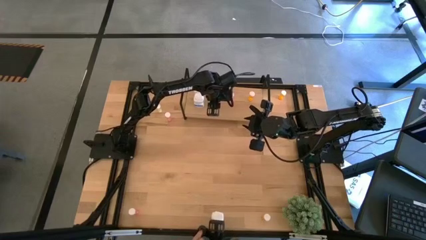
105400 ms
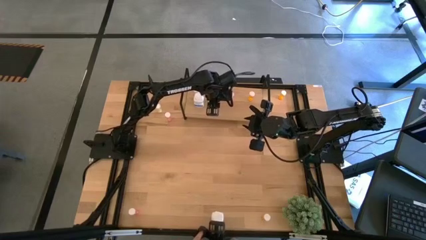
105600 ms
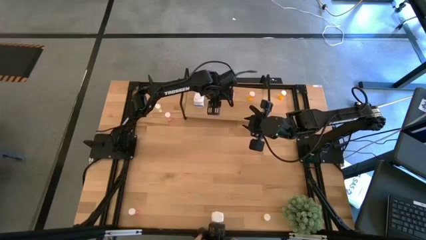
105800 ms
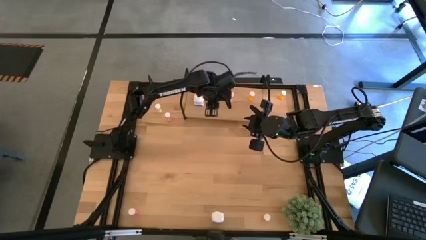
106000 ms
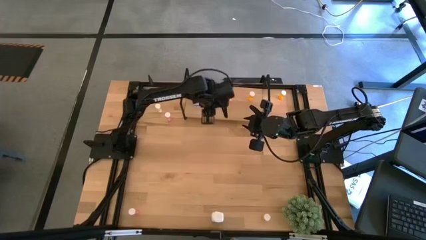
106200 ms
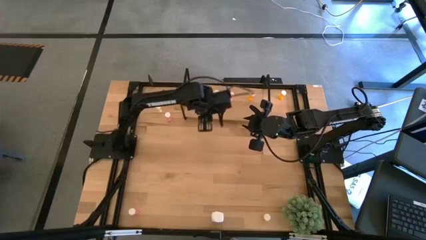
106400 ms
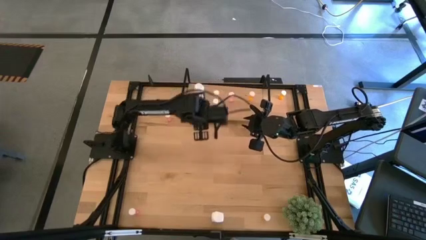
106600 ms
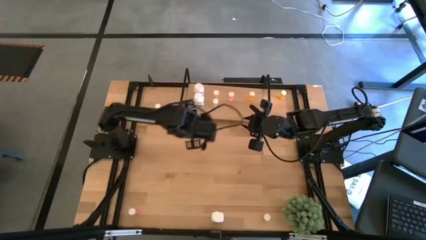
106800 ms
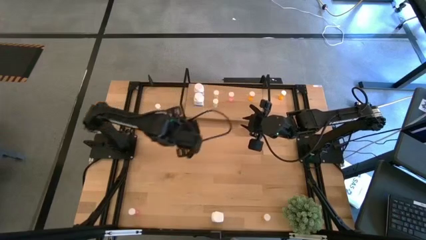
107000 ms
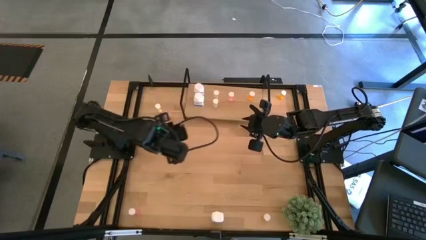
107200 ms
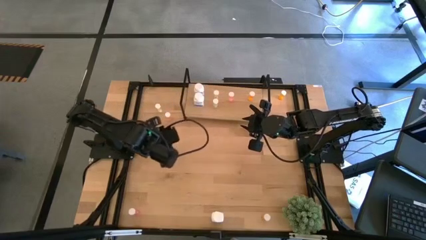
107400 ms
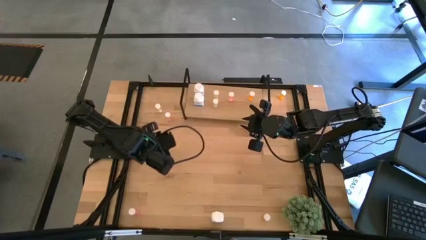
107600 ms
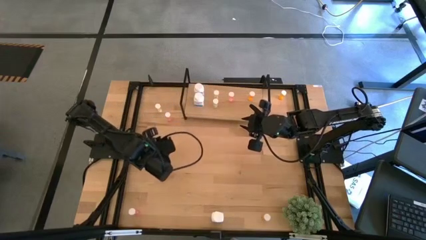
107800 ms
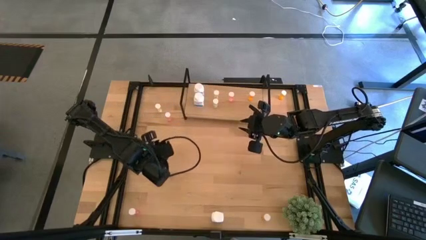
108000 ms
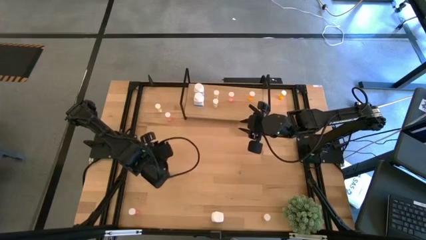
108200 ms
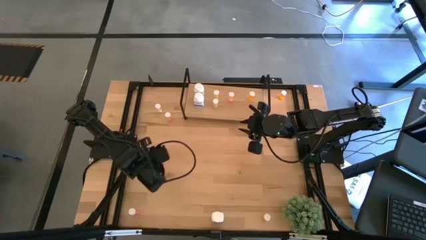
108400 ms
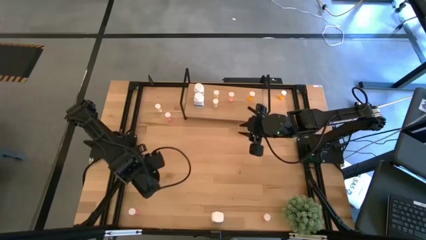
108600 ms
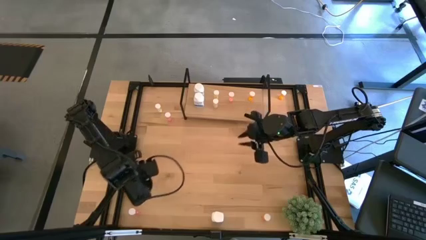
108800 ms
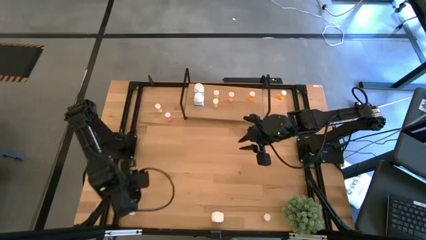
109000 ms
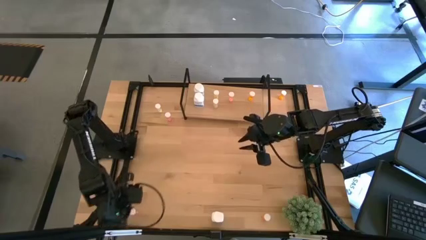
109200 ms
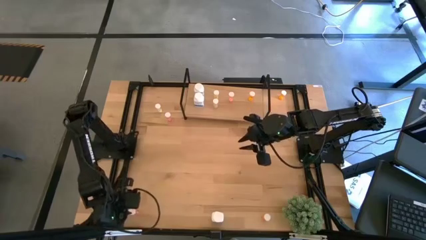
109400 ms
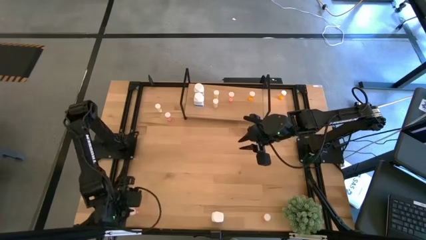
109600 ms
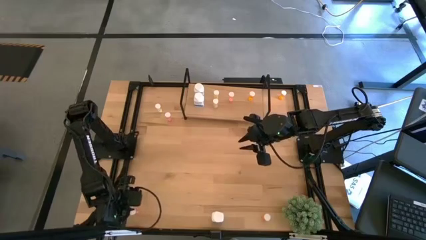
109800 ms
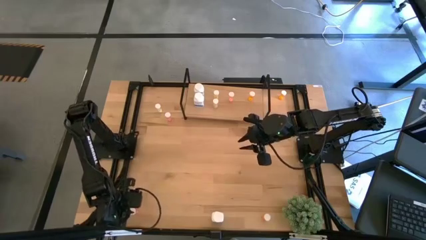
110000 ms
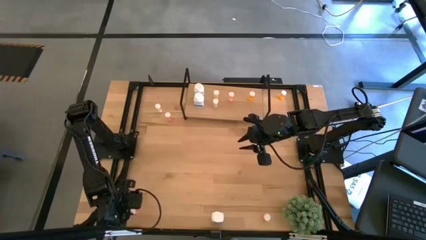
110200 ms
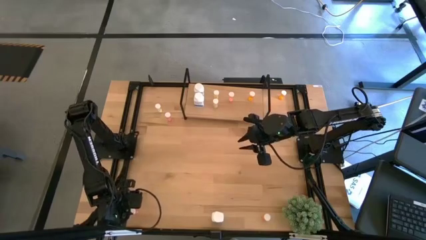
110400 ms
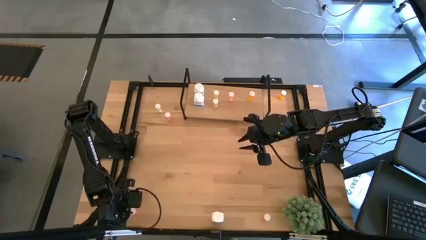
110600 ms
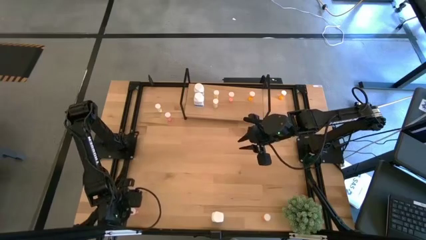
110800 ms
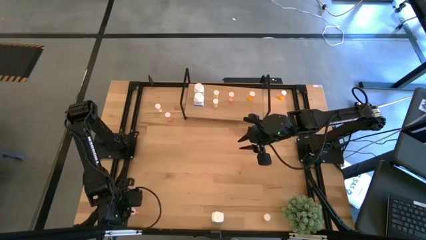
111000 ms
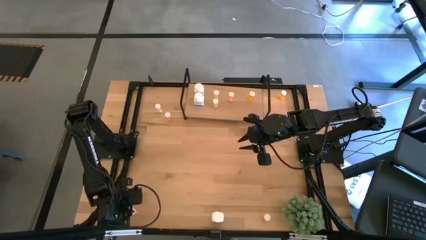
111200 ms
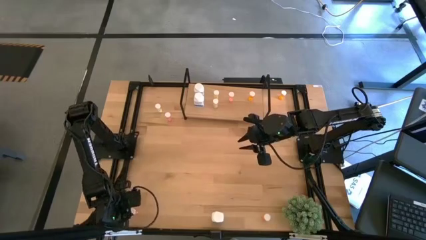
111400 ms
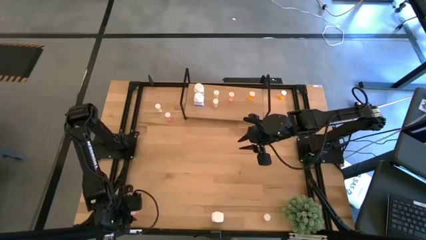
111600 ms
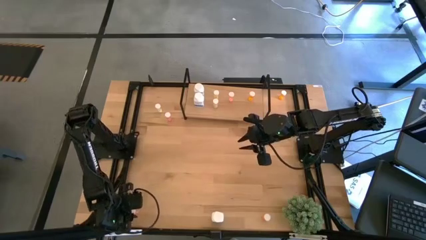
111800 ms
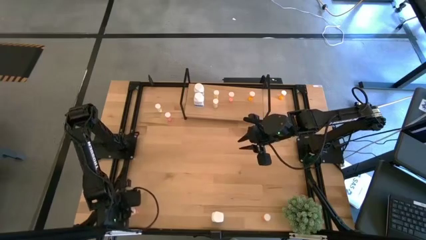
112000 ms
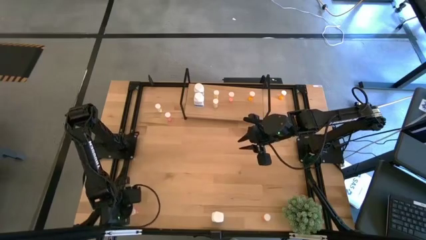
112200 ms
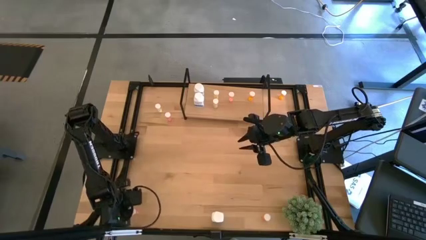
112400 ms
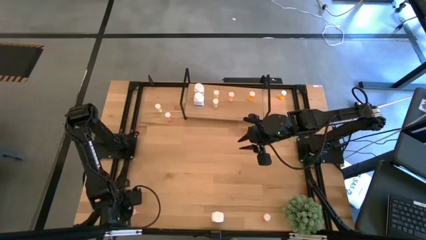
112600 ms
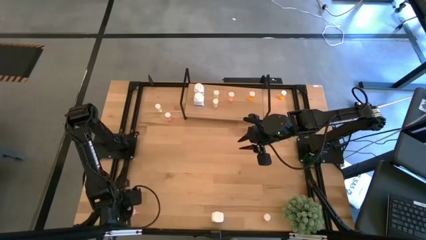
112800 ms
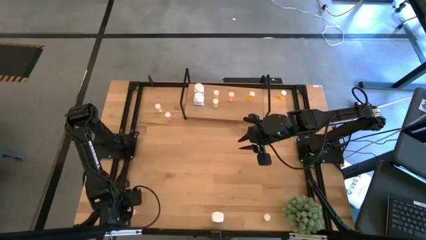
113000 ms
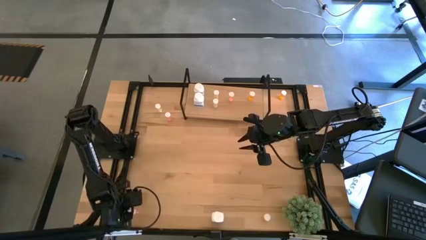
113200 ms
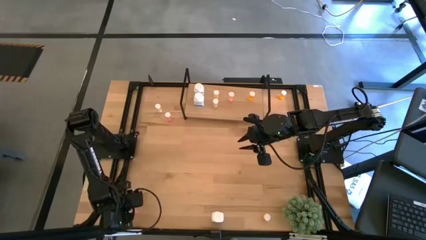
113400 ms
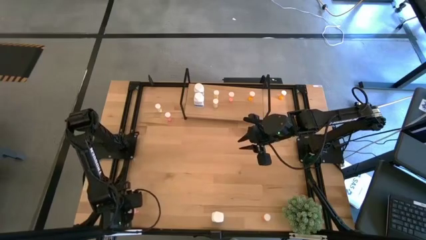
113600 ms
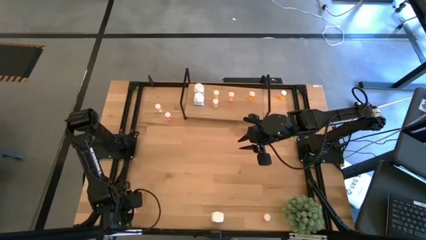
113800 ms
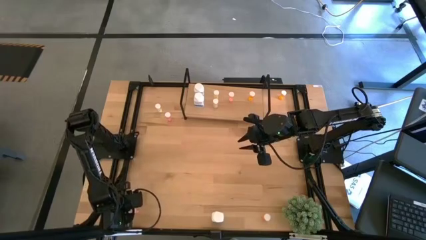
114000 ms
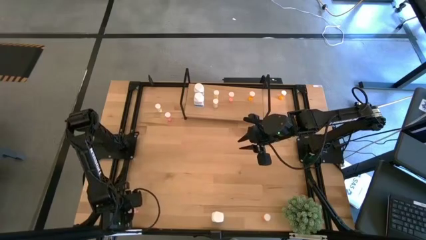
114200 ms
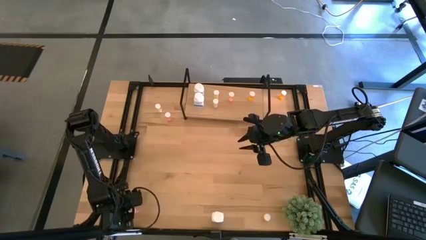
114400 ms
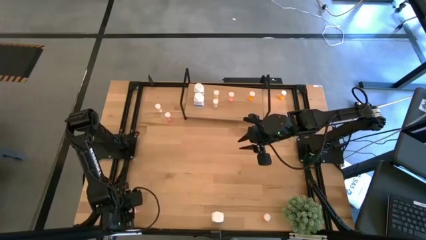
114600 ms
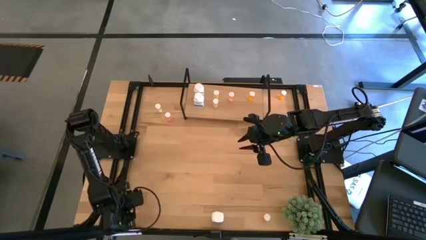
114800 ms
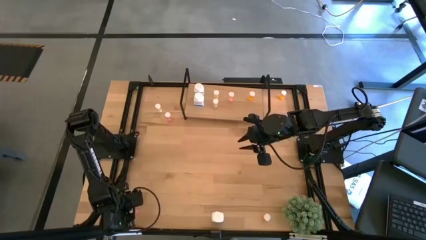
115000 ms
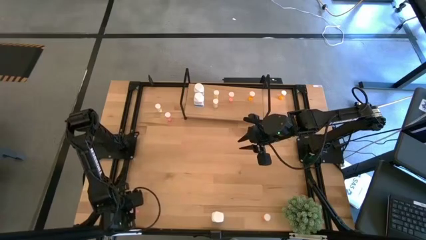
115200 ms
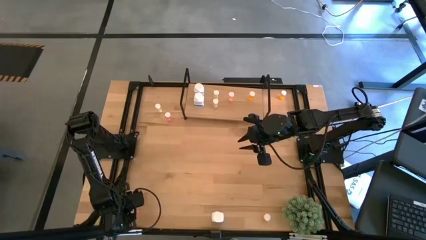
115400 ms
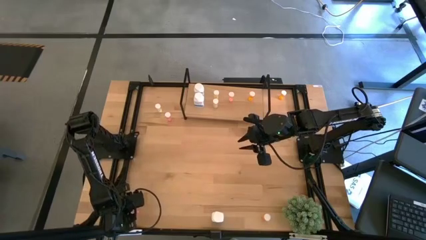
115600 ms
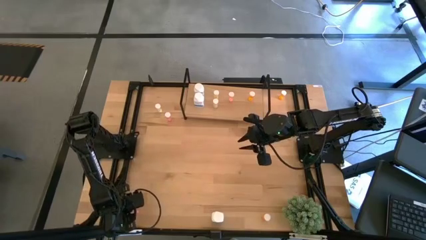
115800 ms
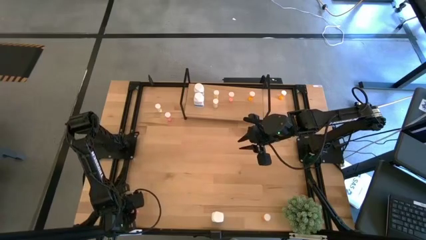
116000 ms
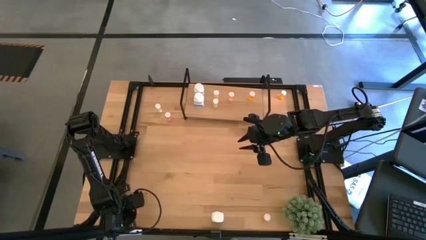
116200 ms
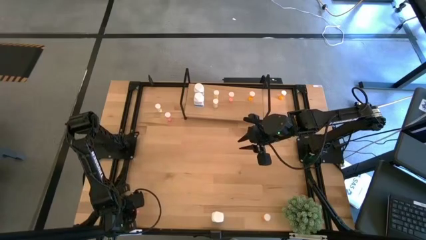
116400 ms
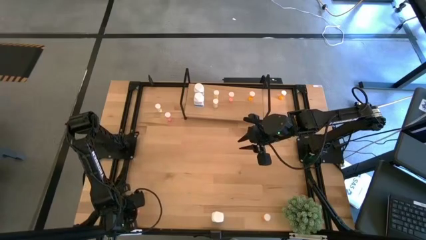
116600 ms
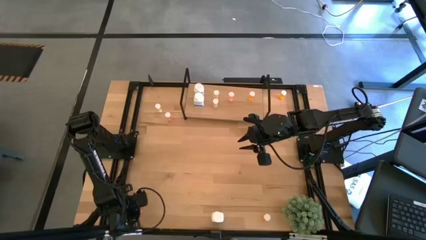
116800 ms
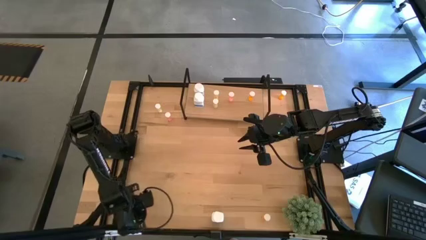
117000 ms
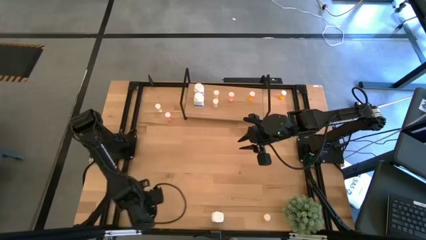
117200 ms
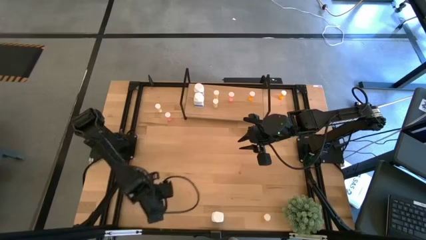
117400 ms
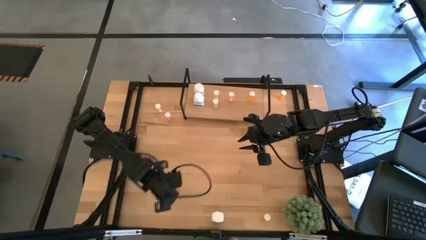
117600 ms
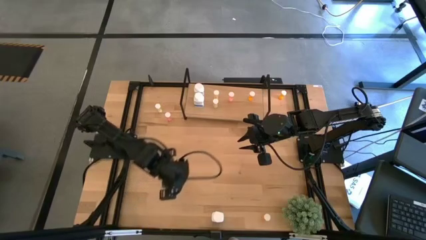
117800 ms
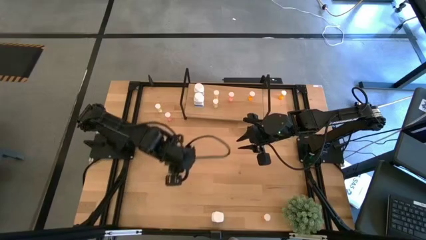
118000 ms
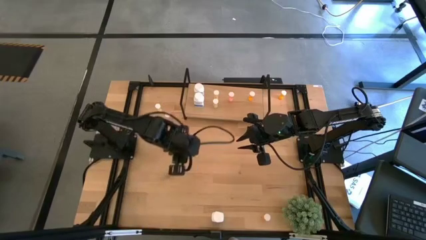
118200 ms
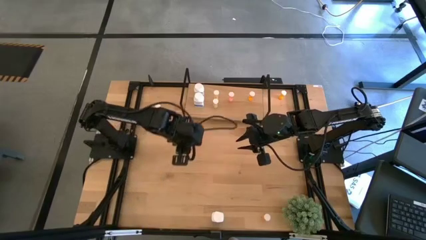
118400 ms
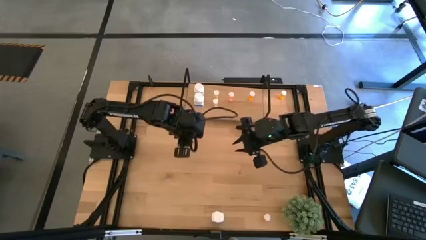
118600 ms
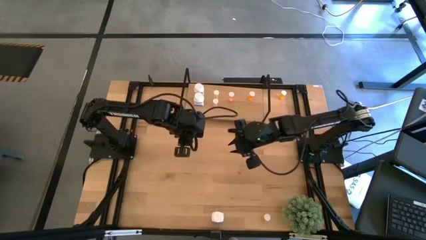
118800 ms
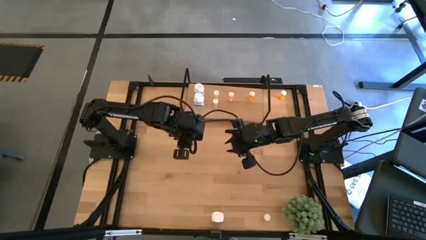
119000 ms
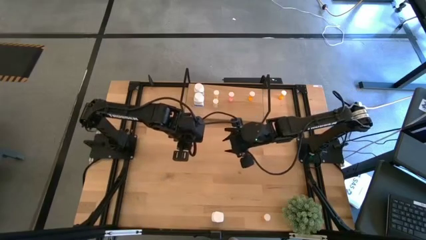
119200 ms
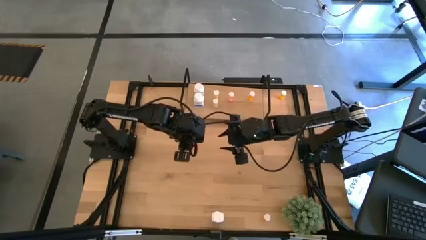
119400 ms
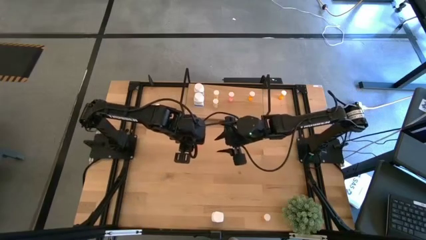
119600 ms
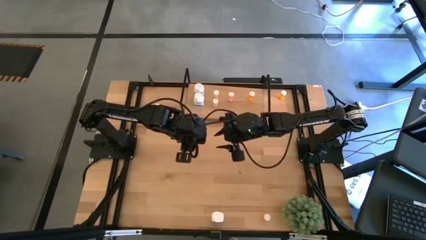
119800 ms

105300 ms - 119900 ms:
Task: Pick and place medicine bottles onto shelf by color
Put the bottom red pill bottle on the shelf aligned with the other red pill bottle
